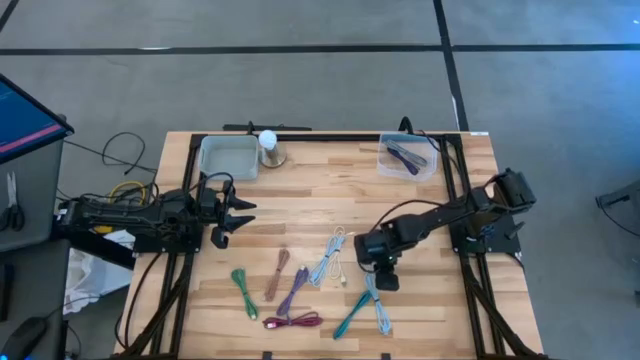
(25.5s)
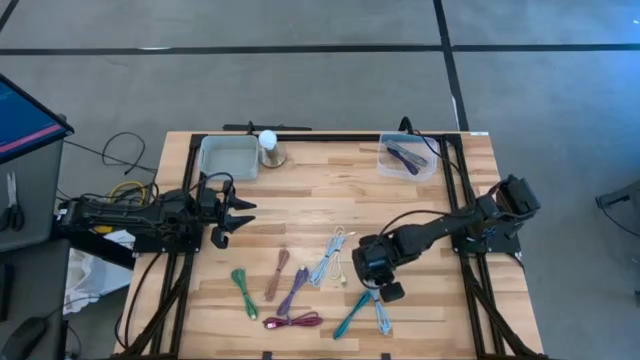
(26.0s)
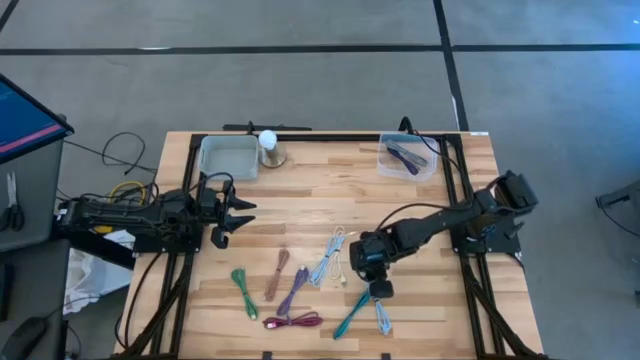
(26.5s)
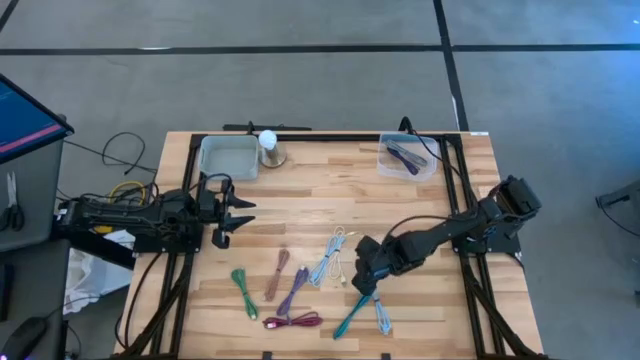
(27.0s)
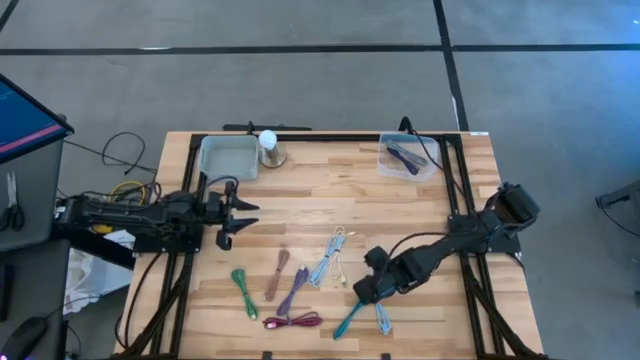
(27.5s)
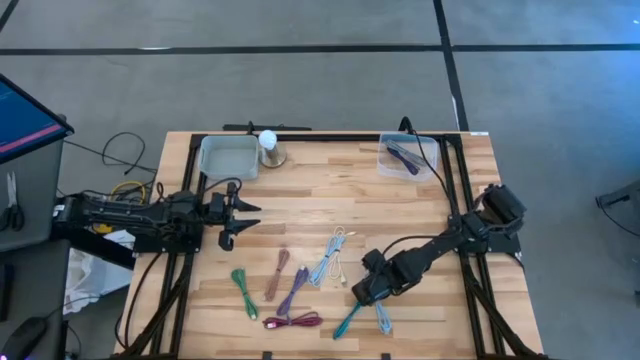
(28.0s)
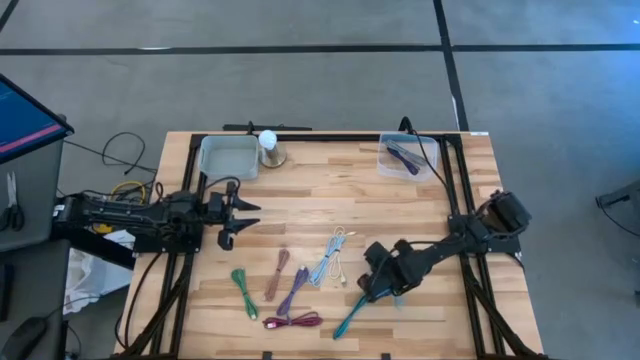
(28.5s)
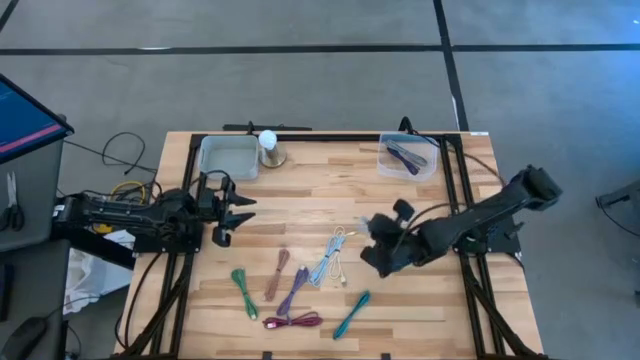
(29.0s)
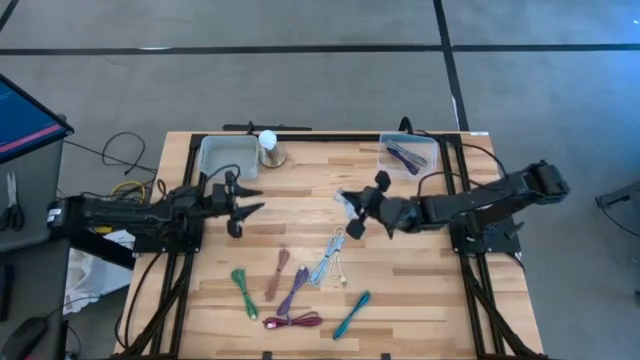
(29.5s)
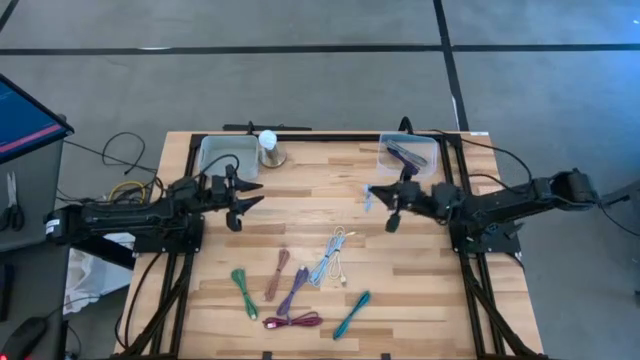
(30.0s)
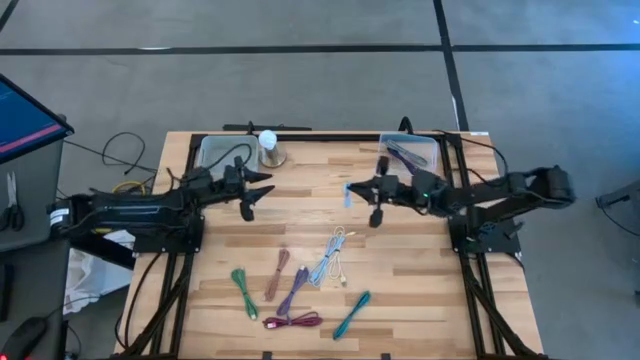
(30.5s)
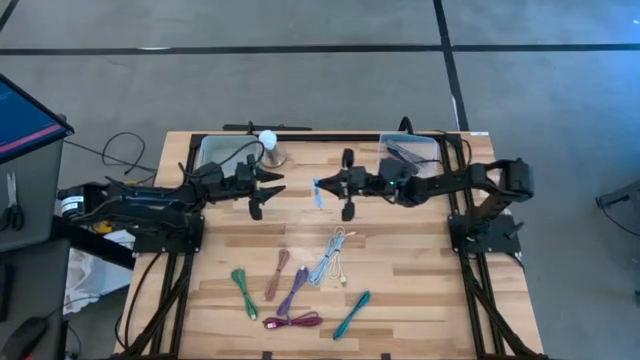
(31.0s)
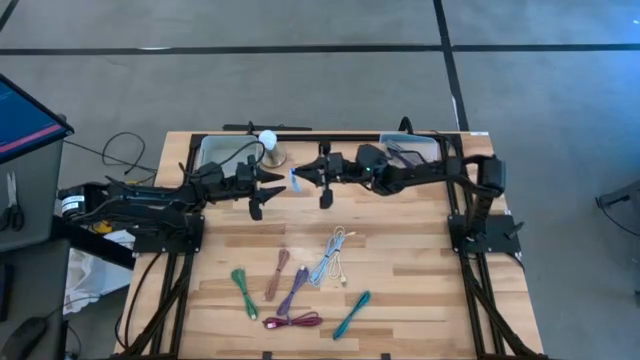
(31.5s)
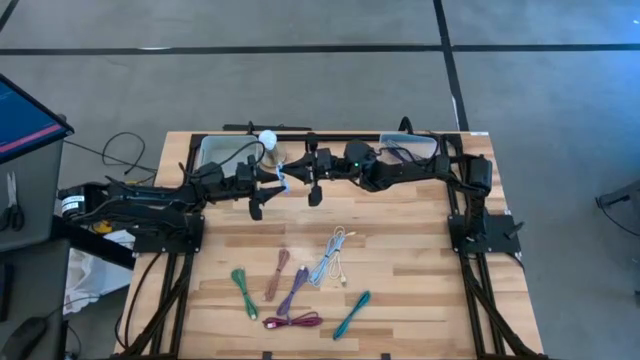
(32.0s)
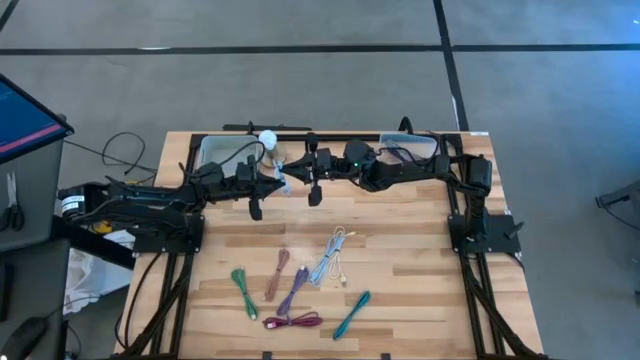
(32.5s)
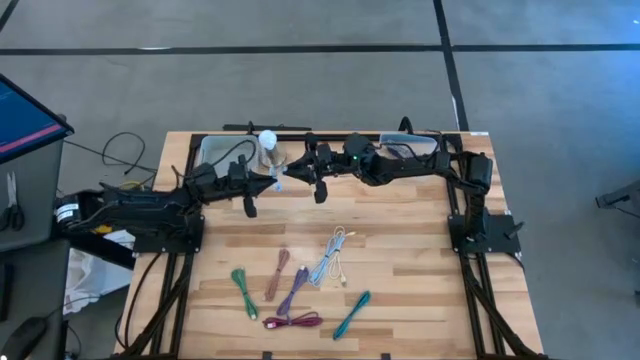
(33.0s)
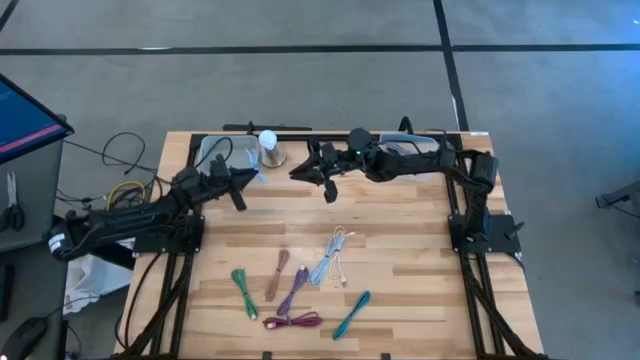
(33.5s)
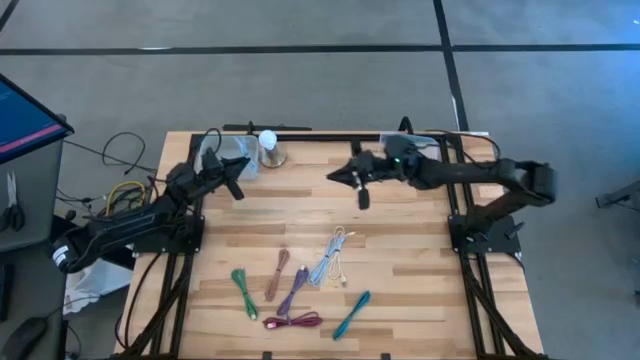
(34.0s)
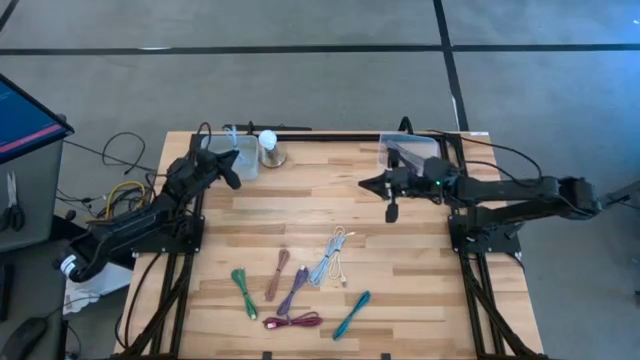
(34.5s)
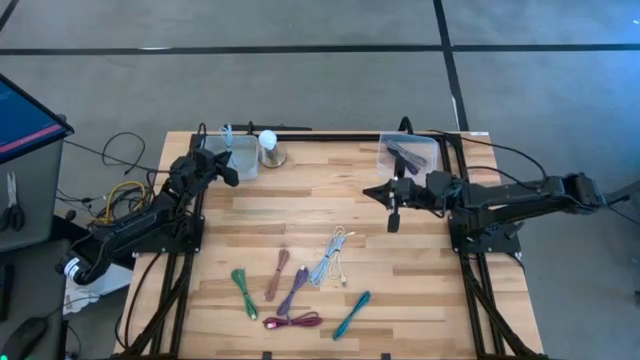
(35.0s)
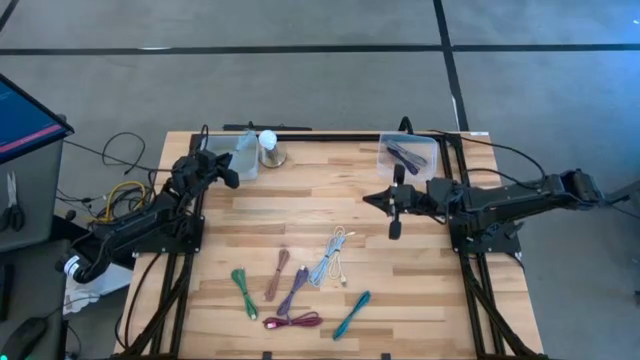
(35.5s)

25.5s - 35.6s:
Task: Pick & Place USB Port
Put the bottom light blue charger cable into the gray bin

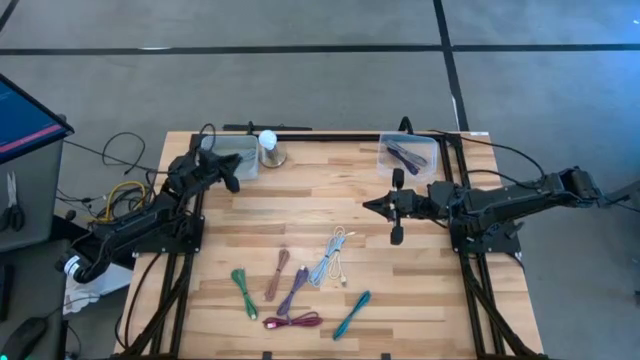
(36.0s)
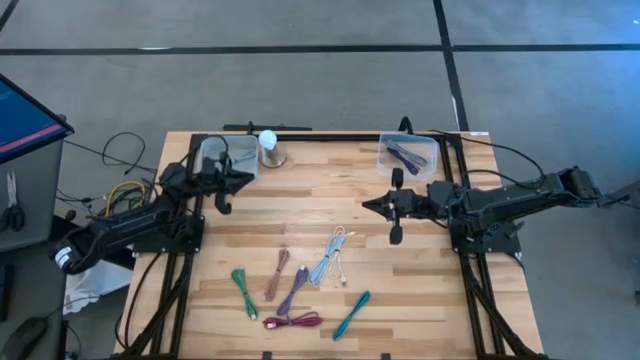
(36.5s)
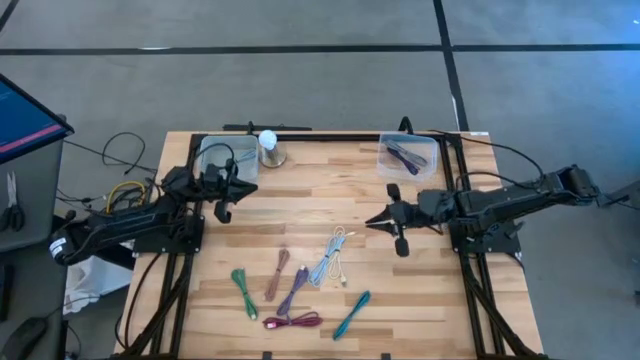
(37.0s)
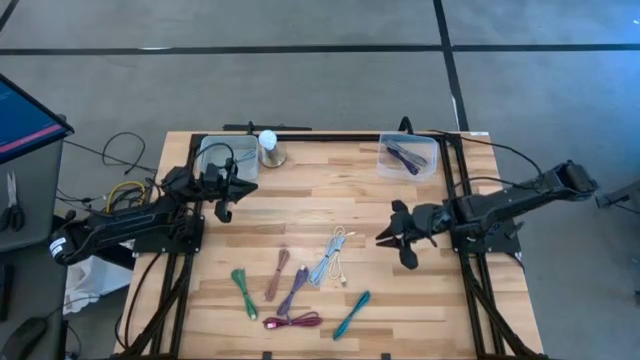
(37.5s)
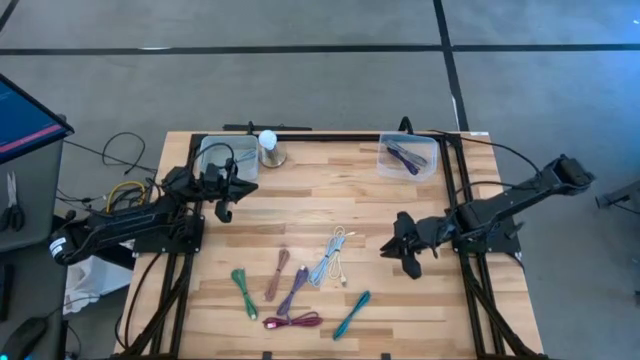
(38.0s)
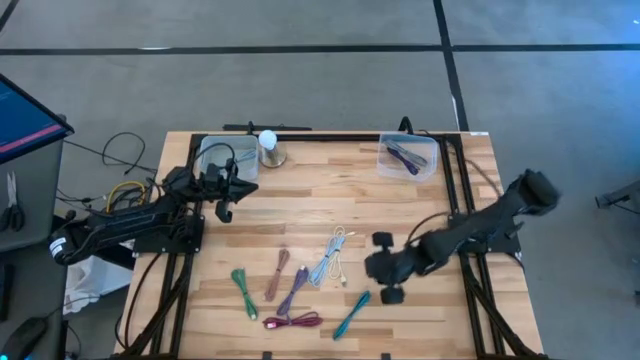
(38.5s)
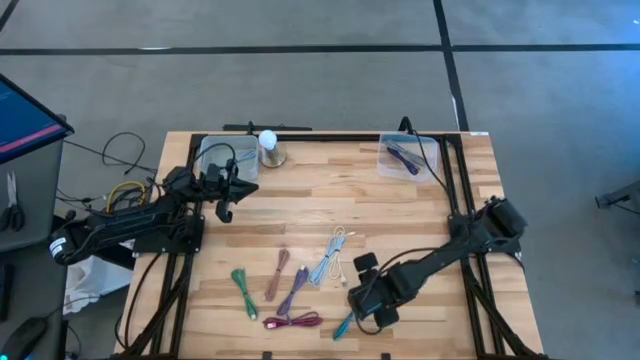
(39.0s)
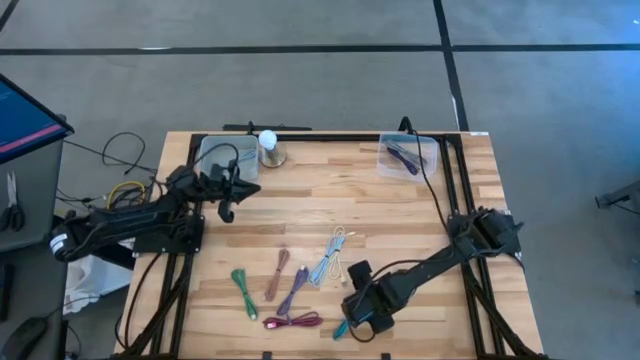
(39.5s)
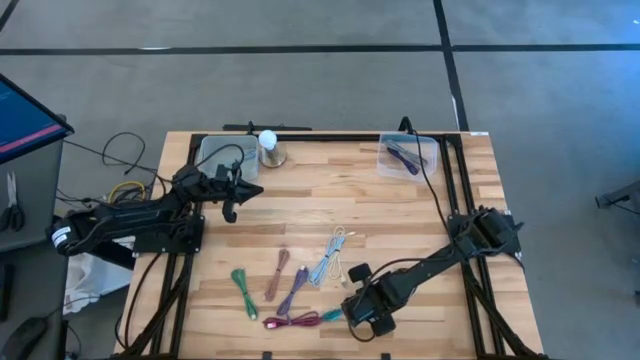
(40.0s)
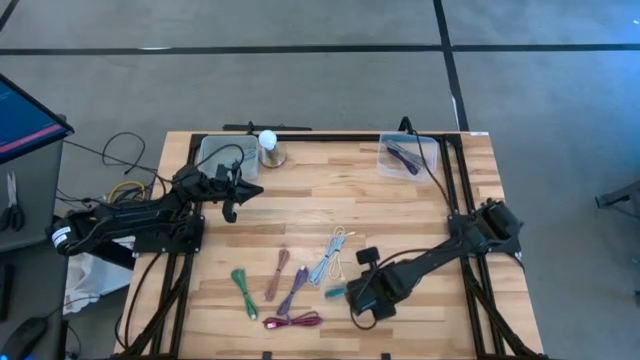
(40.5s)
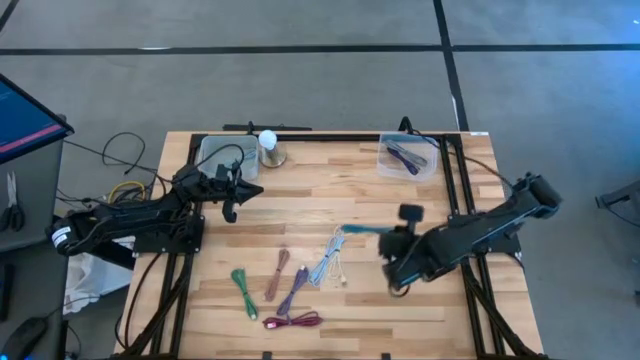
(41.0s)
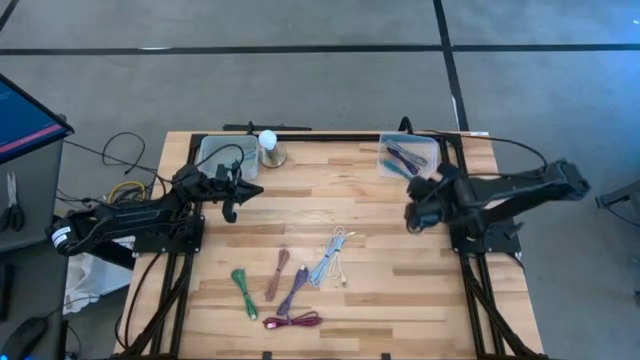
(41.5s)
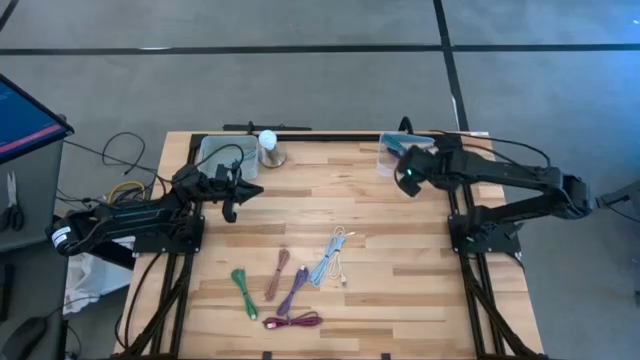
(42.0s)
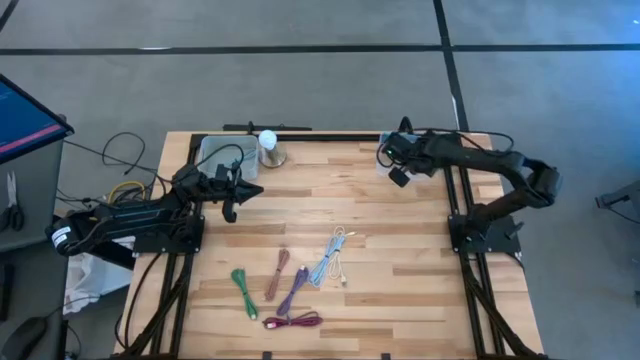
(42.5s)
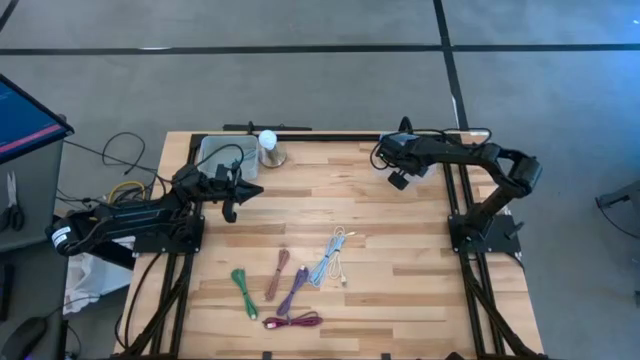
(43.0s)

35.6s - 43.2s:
Put the light blue patterned charger cable into the transparent bin

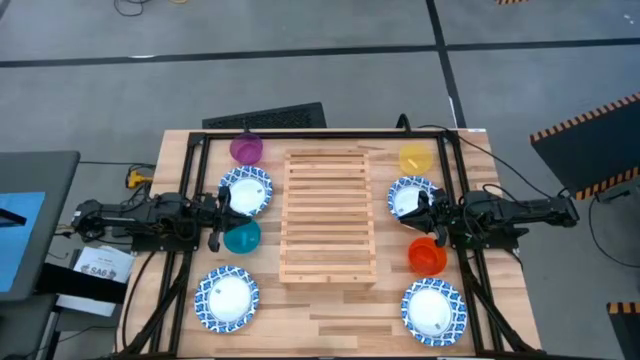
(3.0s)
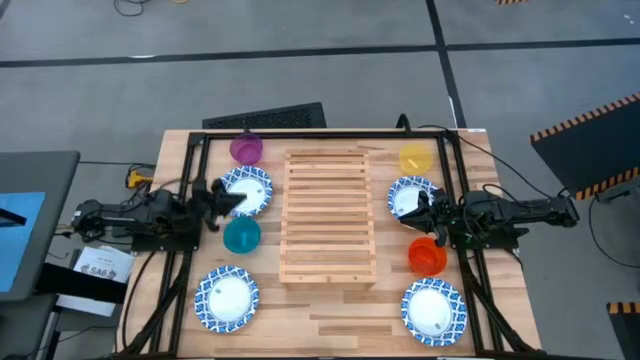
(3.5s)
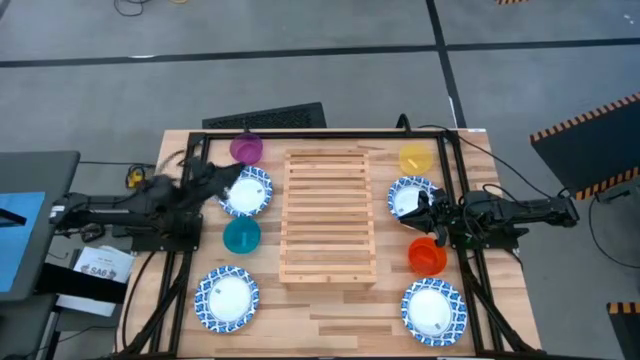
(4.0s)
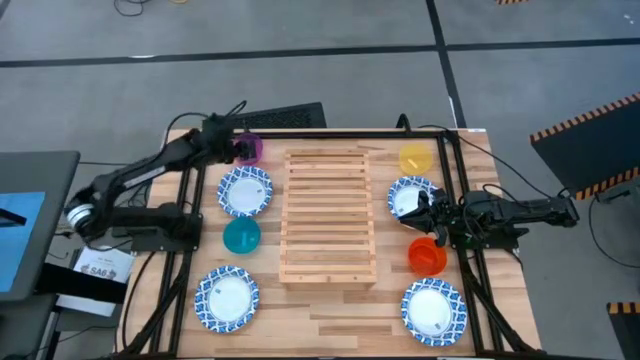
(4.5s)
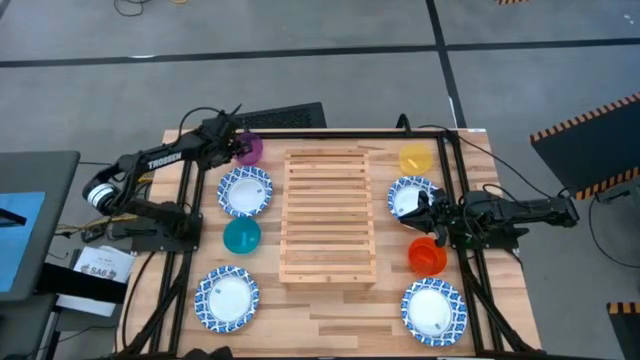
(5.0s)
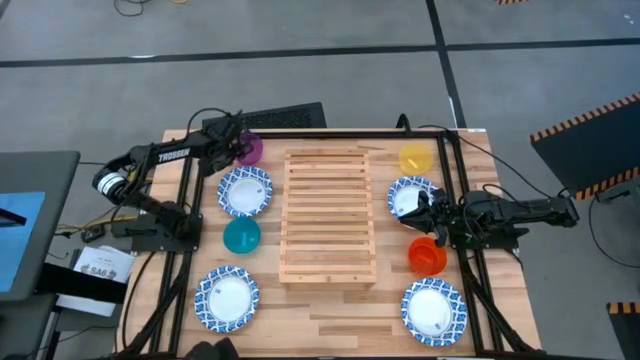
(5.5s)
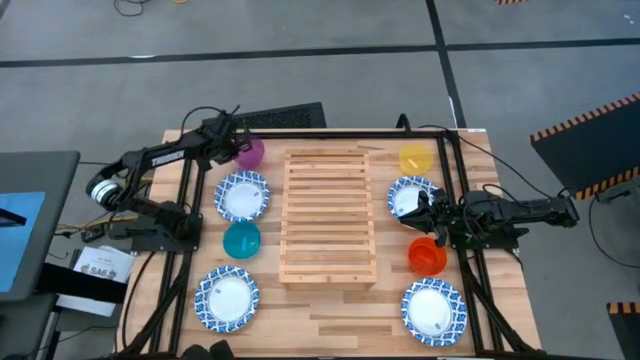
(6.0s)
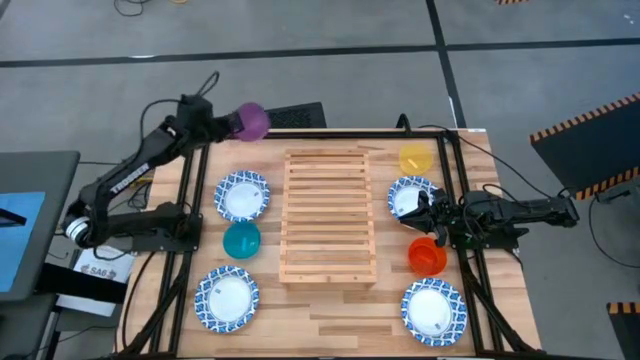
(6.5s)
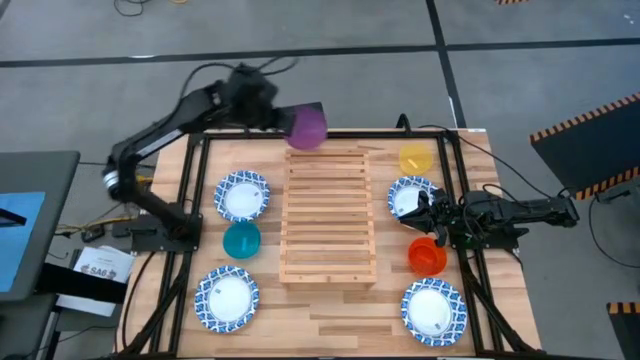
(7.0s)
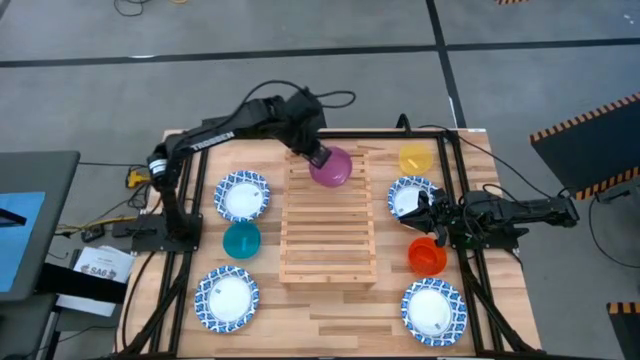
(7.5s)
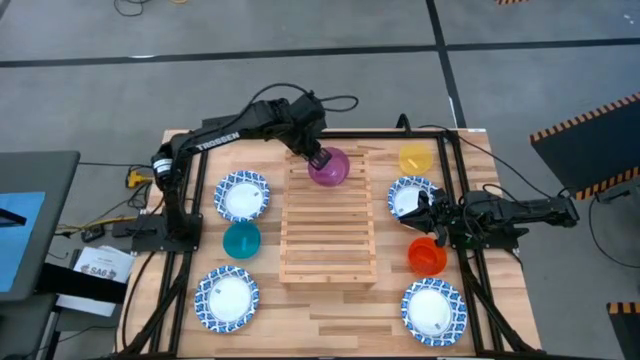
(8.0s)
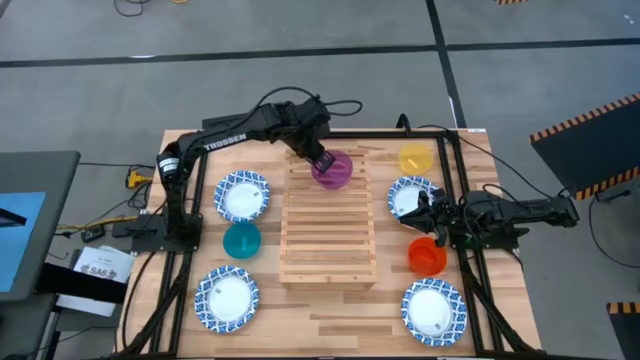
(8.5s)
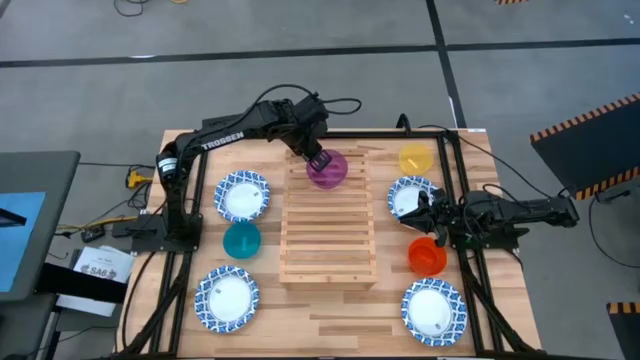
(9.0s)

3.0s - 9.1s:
Task: Place and stack bowls onto a shelf
Put the purple bowl on the shelf
